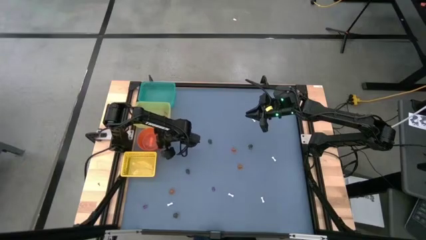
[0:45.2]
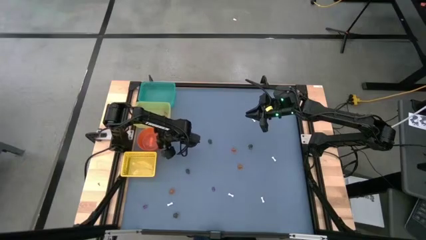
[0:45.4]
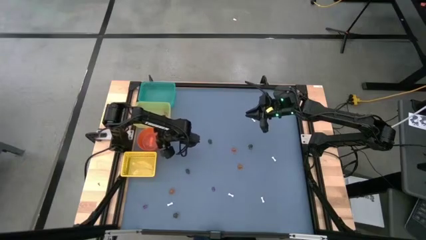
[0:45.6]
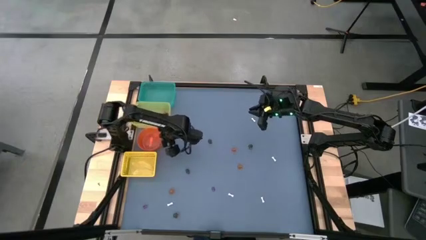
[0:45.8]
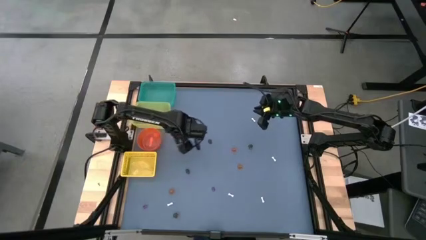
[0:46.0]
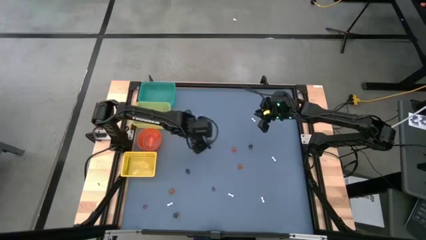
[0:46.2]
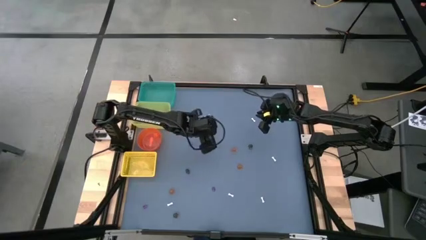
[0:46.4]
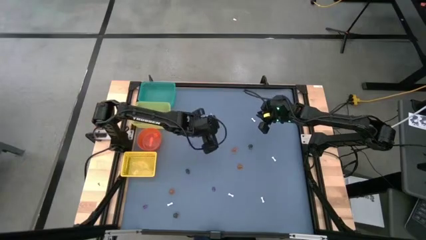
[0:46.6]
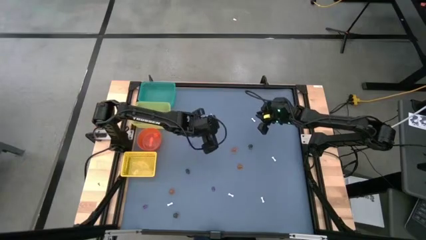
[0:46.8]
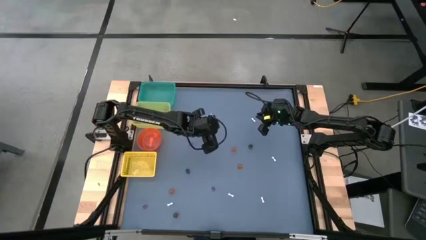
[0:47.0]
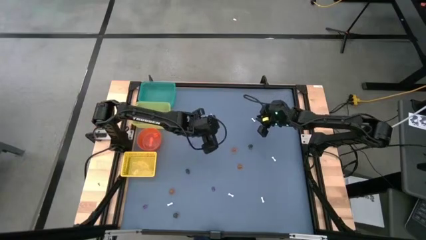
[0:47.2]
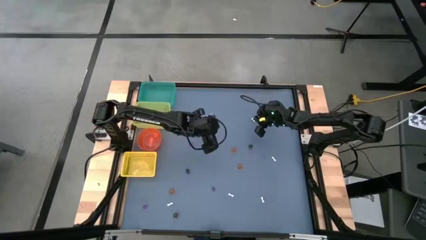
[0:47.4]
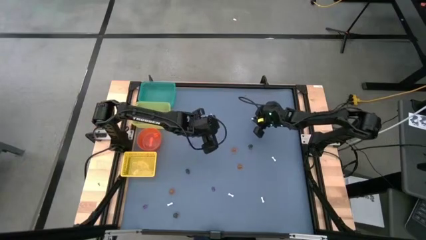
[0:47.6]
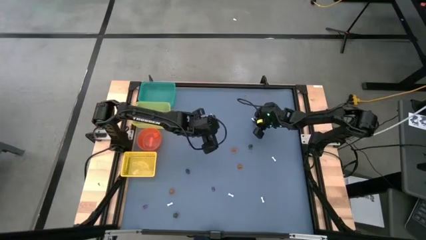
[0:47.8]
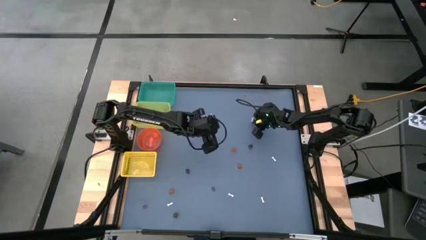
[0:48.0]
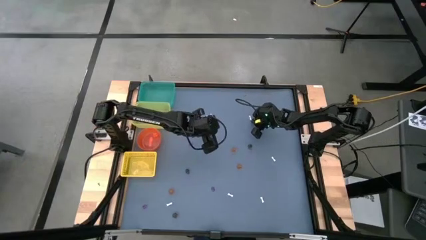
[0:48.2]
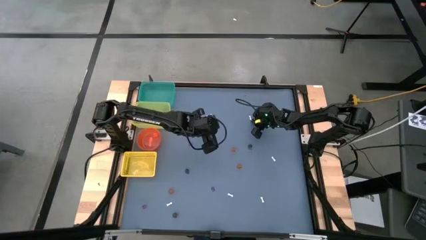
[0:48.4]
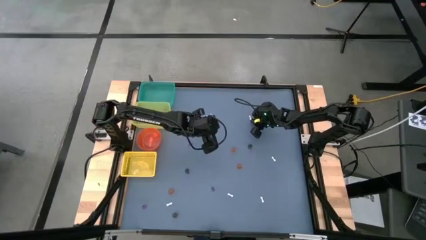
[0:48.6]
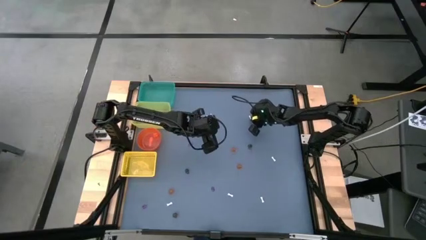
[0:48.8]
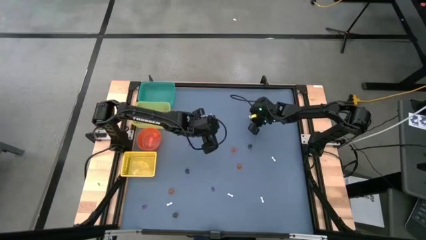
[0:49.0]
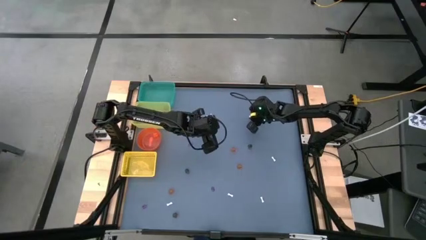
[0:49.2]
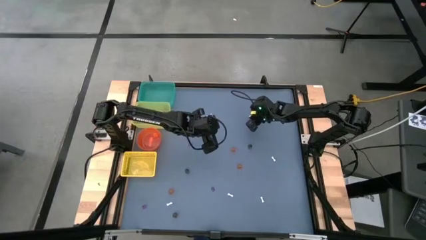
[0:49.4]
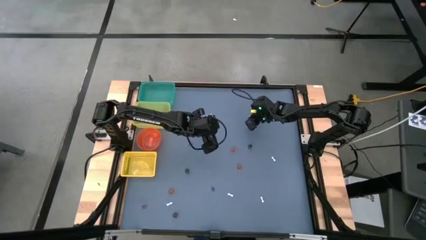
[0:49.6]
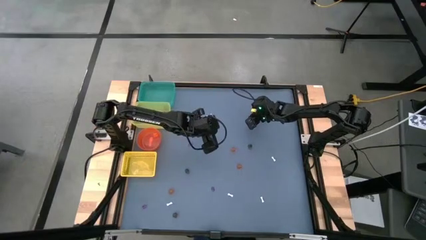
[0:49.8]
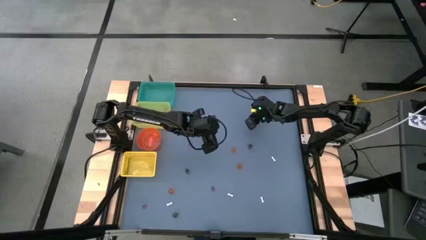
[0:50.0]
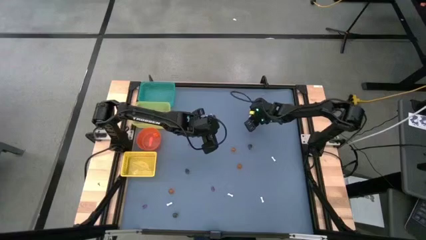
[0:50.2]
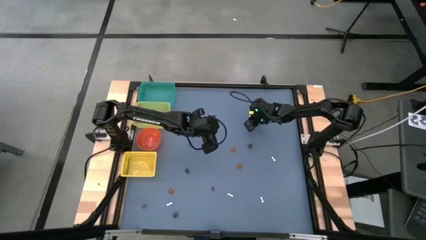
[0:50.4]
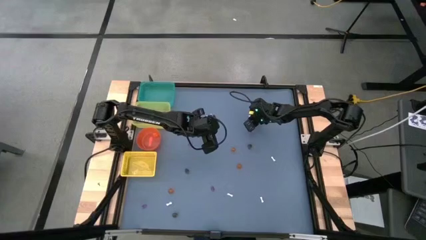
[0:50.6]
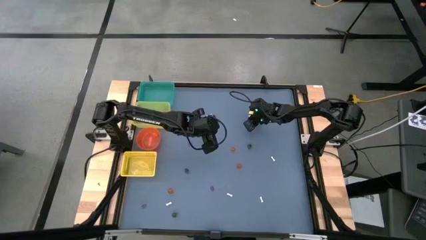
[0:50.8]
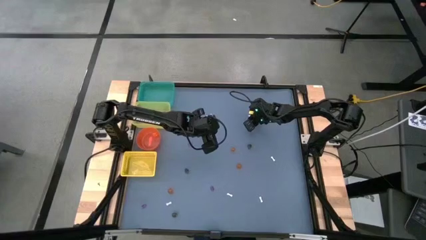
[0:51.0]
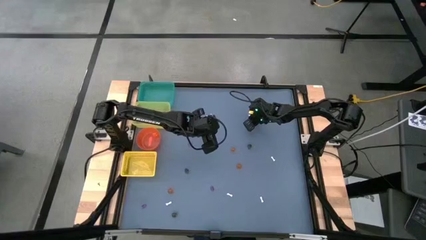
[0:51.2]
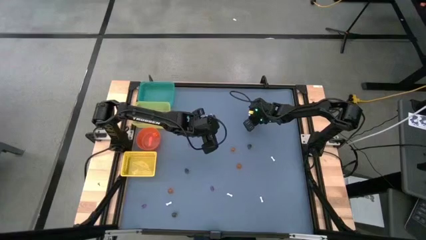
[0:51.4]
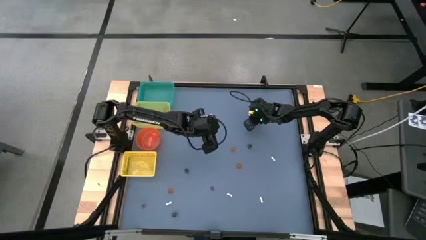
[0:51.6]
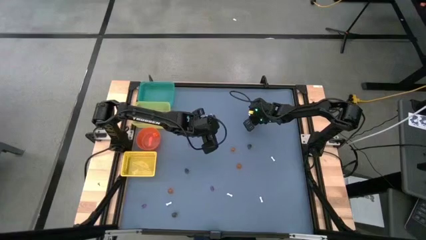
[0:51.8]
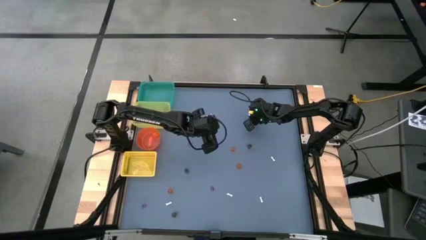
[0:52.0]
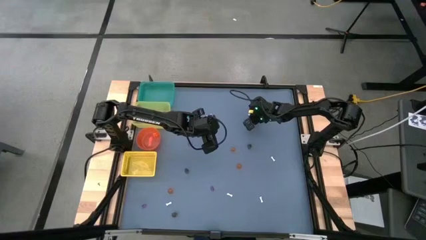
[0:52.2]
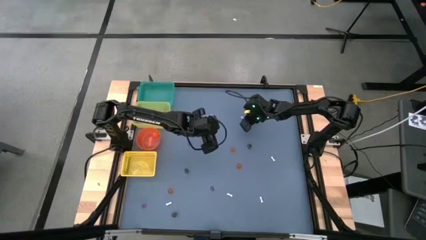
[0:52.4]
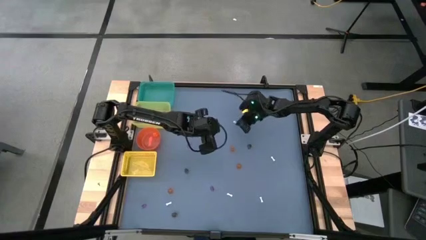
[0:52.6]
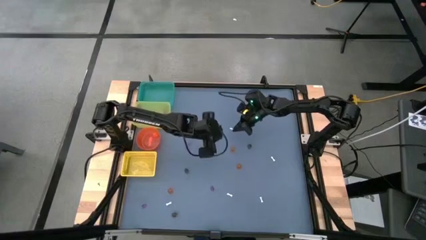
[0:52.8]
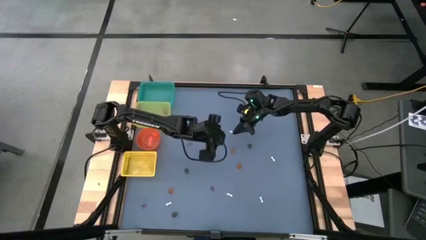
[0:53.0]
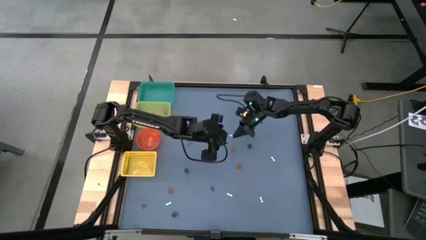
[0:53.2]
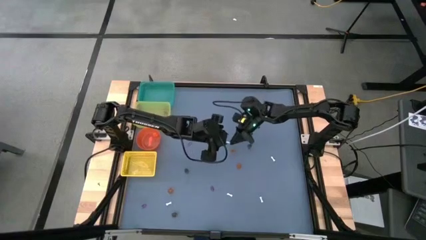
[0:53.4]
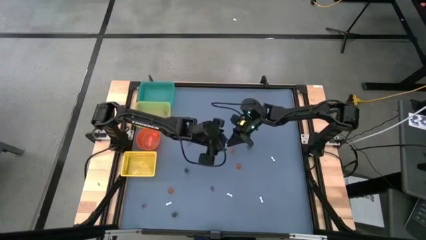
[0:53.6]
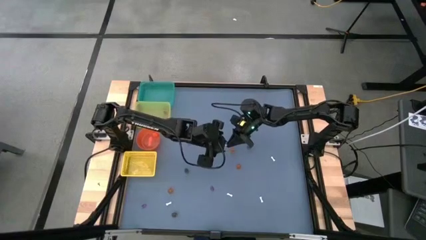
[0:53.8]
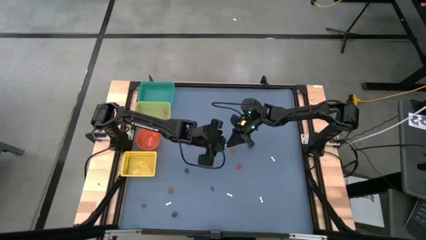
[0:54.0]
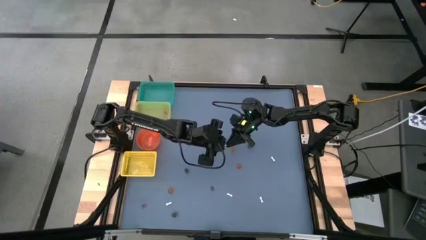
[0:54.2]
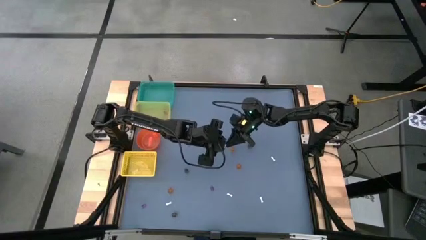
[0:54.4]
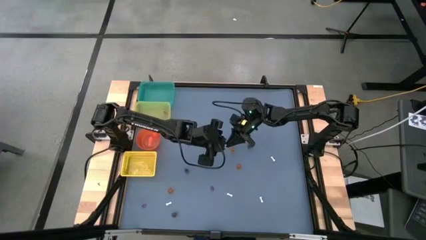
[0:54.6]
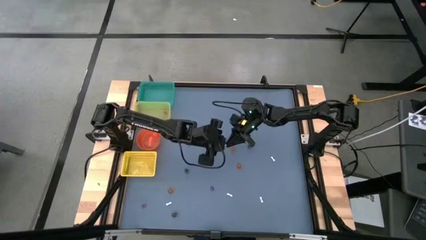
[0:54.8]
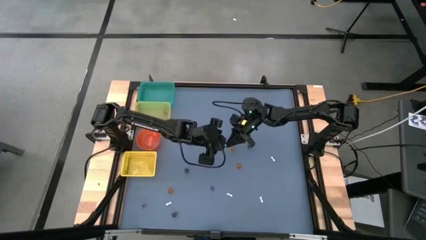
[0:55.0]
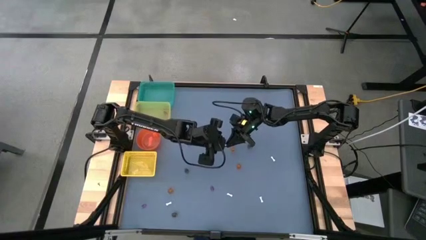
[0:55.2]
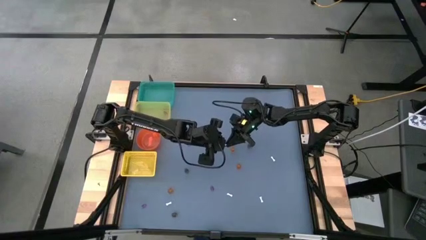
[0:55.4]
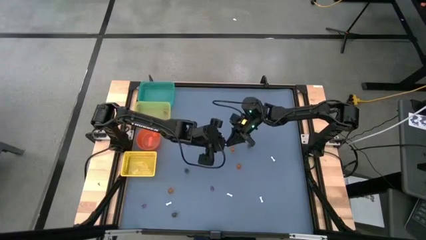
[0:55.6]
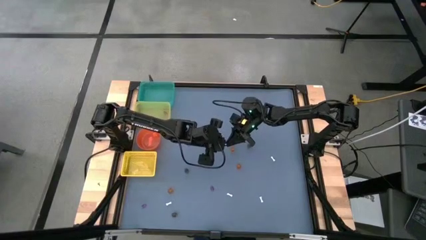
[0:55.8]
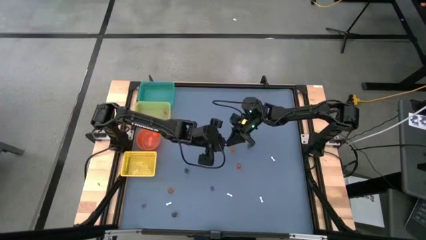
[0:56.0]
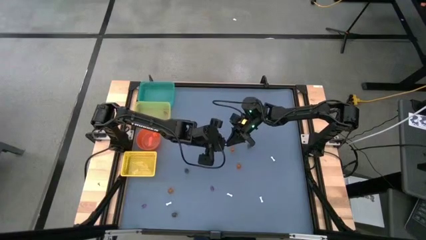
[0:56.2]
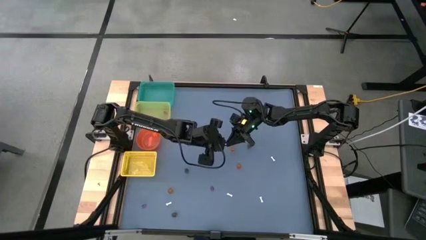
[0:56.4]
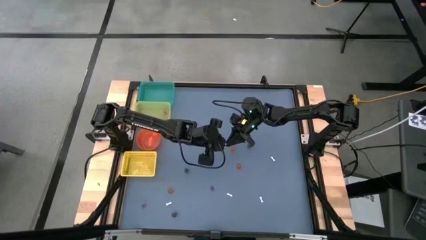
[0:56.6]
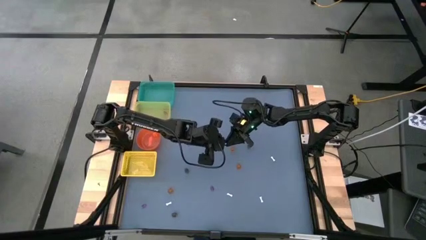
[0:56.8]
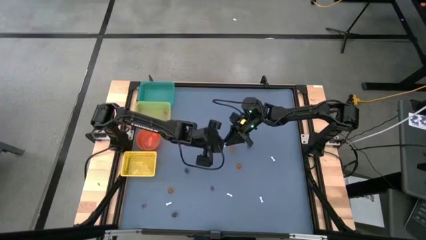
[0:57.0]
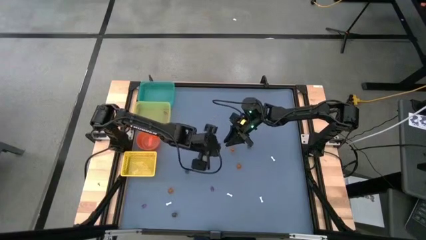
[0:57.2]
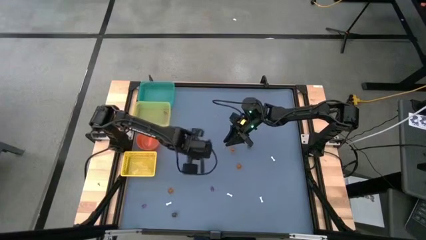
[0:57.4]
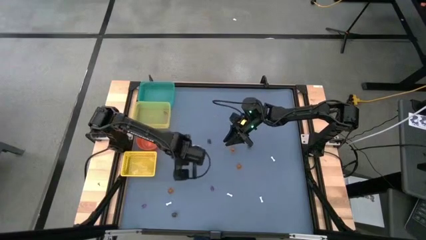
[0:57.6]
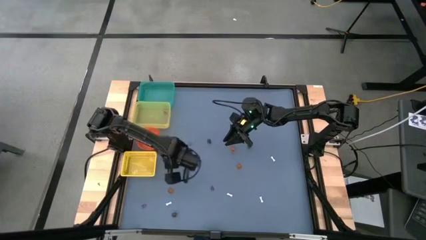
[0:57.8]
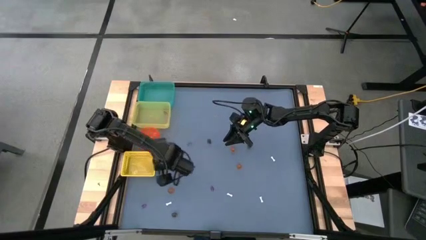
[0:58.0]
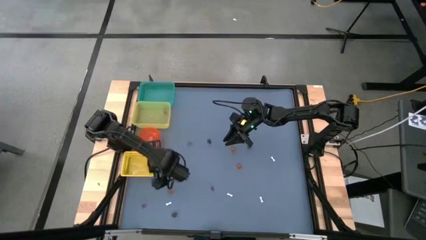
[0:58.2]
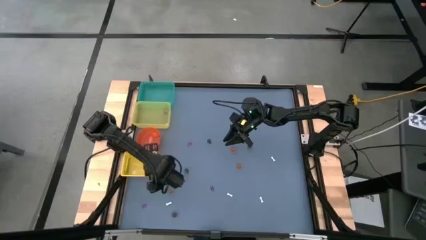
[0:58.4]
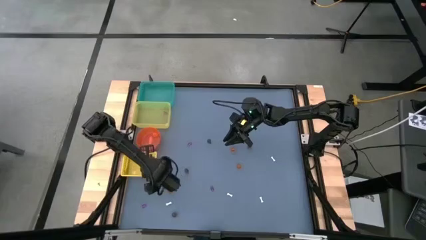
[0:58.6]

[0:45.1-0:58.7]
Task: Sort Halloween decoration
Put the top right white bone toy into the yellow bin

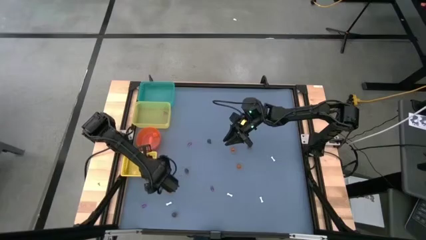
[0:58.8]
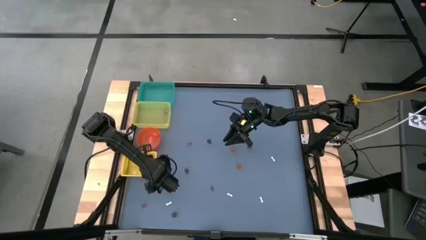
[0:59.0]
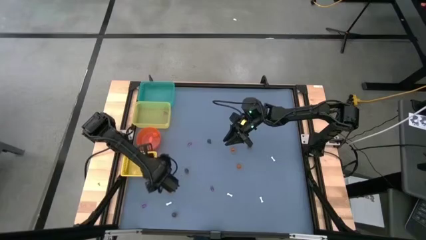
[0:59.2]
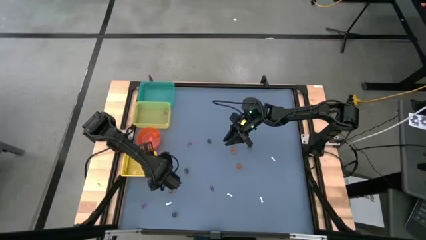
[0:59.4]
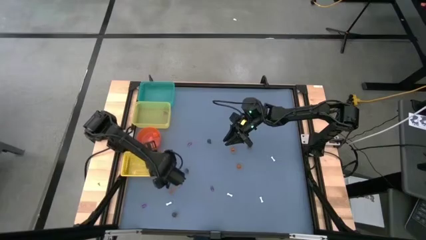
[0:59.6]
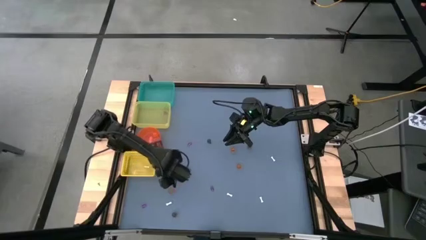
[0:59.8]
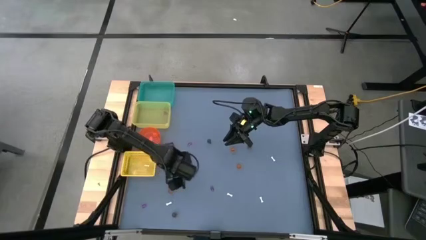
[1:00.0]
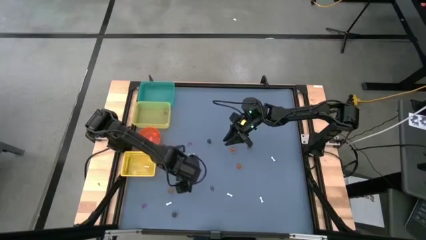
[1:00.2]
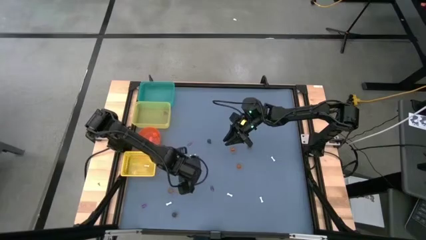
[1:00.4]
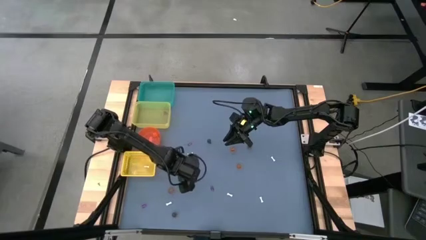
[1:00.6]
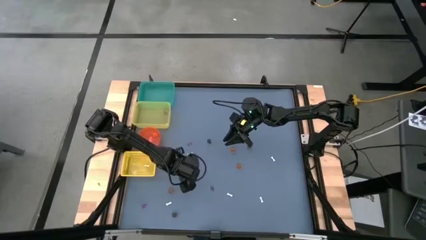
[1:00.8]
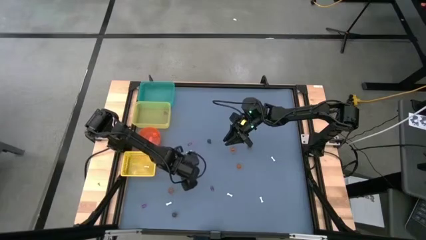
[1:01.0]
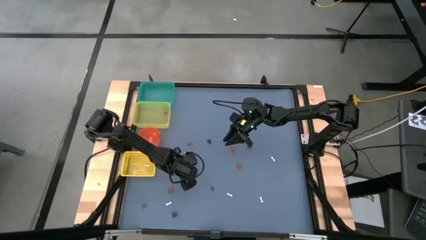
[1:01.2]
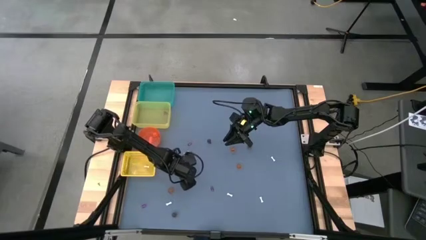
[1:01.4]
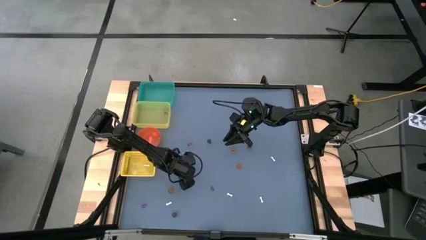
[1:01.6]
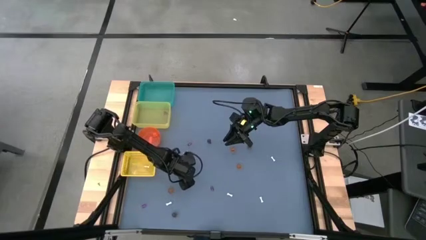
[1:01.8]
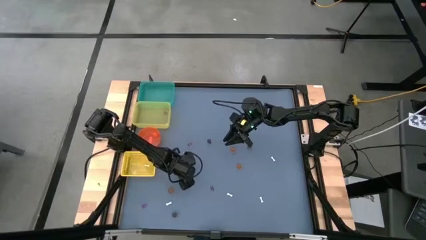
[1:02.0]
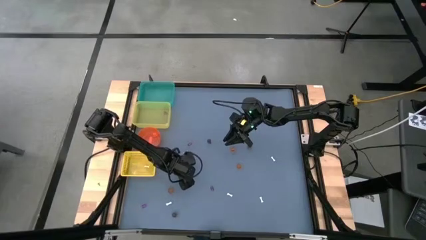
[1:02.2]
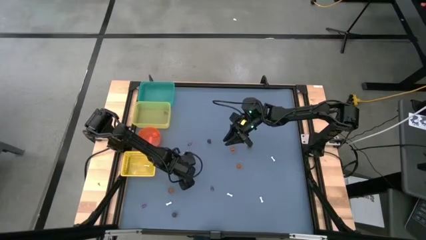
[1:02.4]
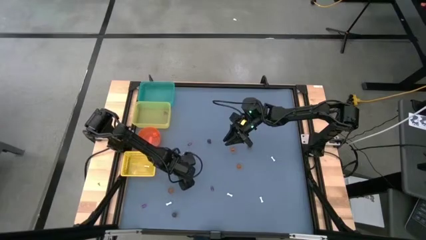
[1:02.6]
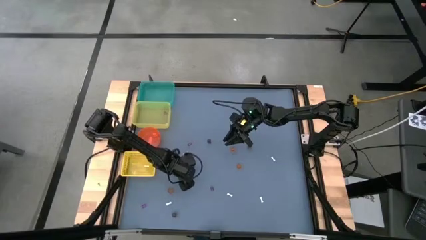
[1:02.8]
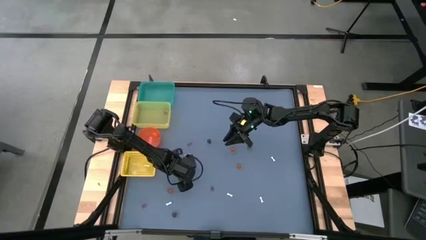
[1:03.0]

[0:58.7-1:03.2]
Put the middle left black skull toy into the green bin
